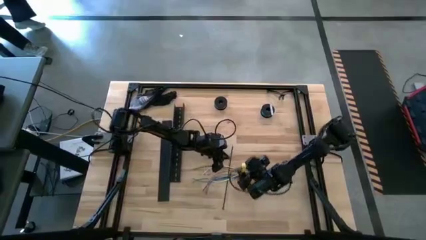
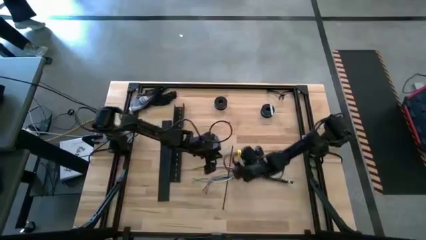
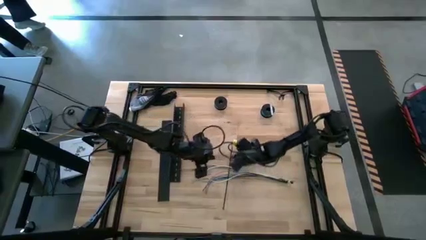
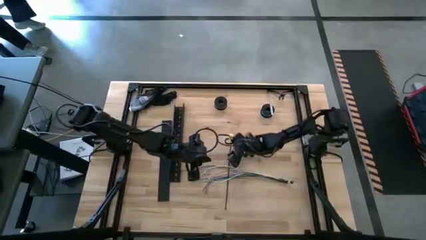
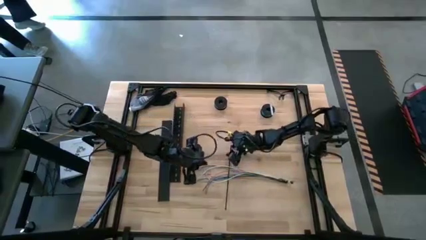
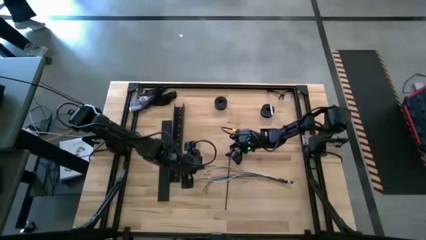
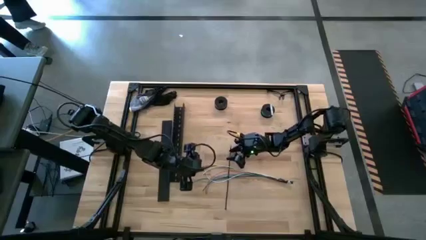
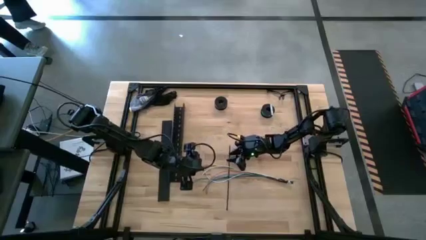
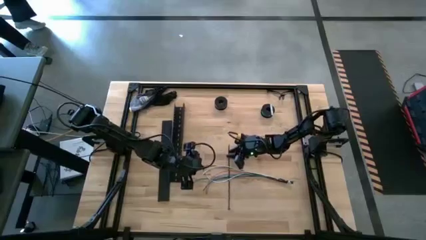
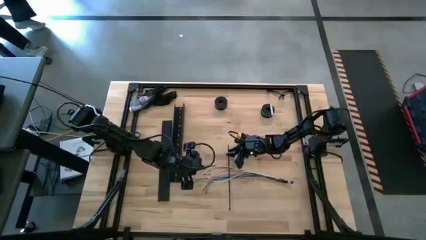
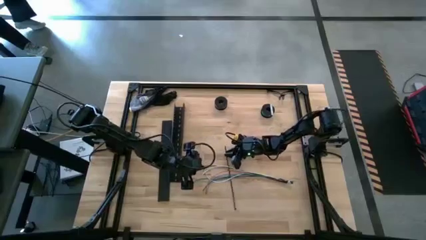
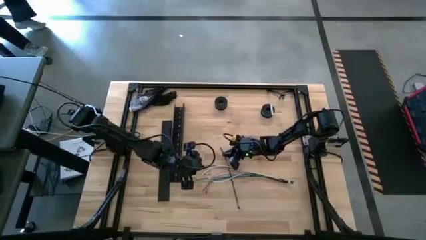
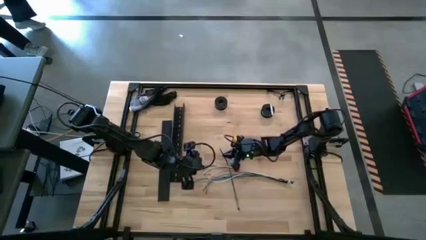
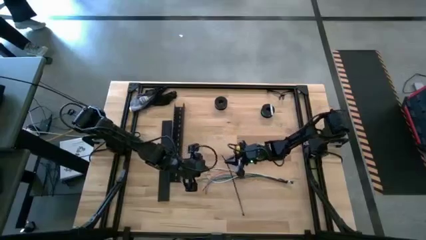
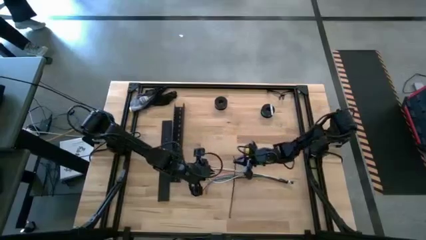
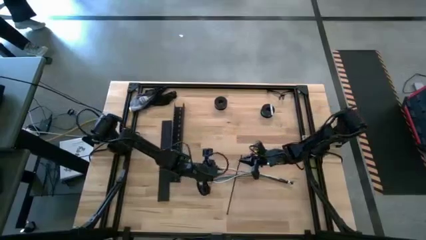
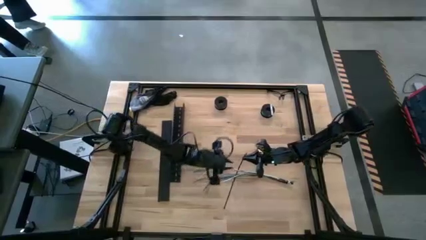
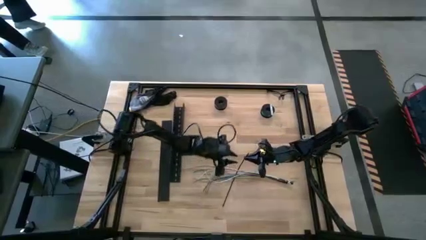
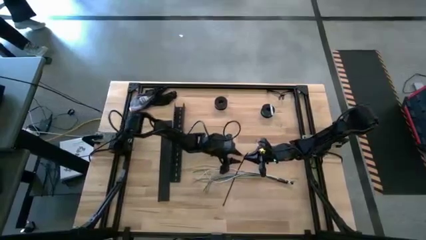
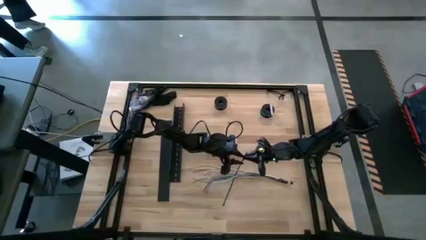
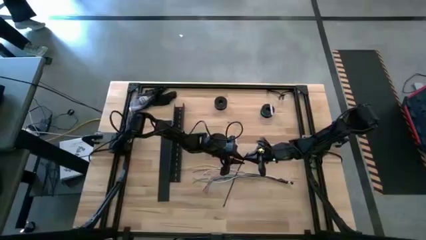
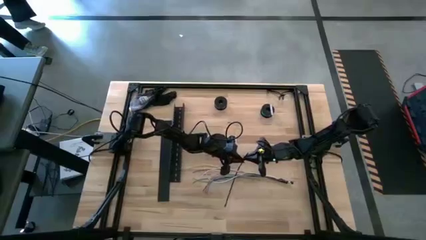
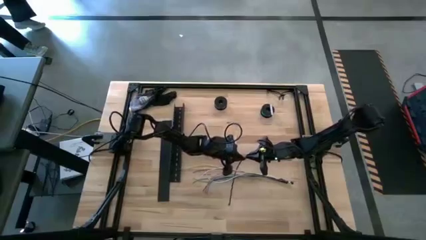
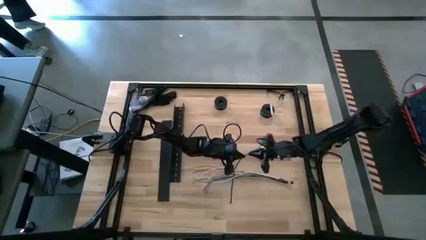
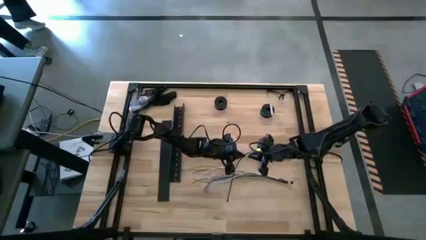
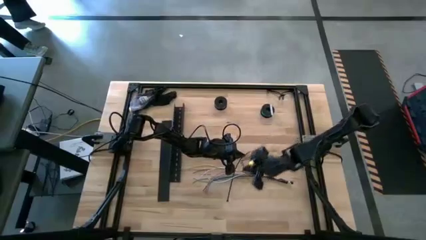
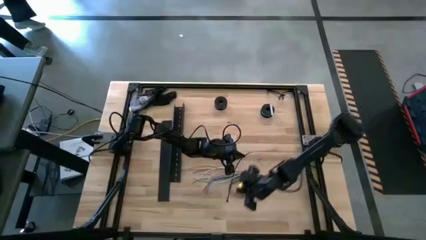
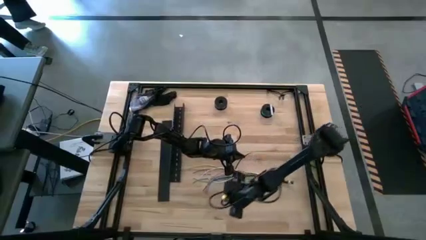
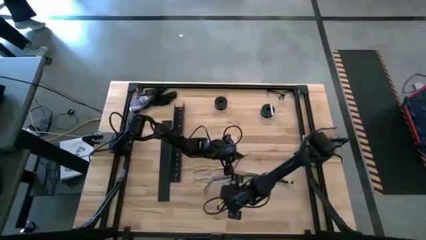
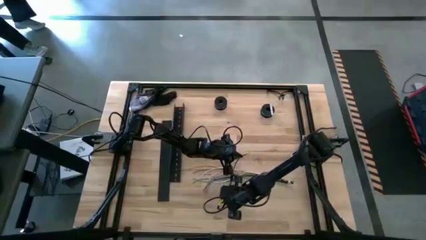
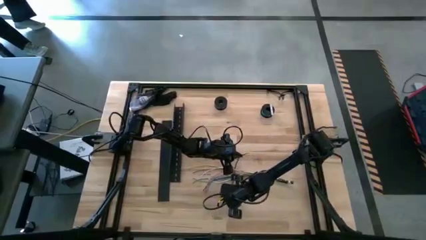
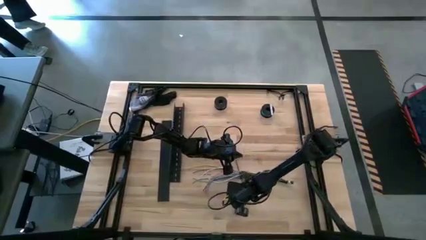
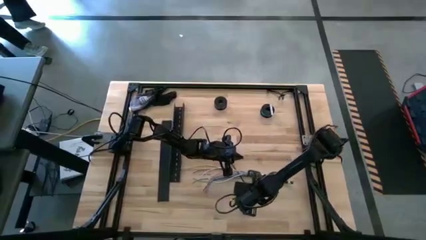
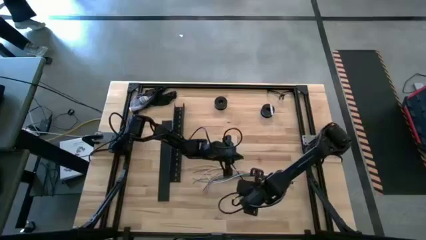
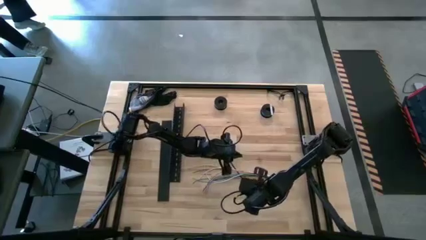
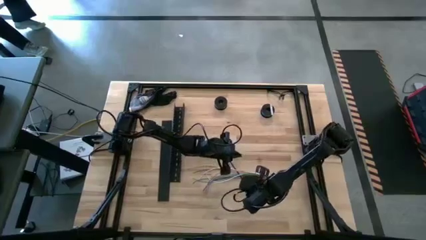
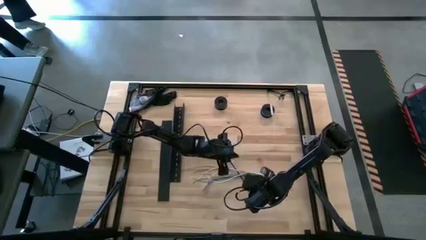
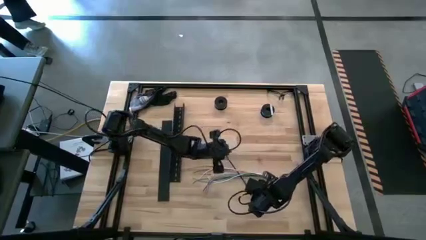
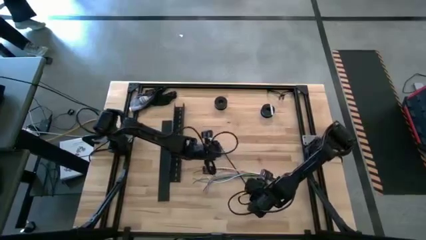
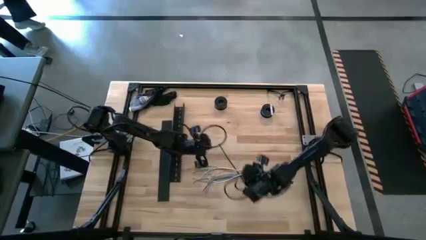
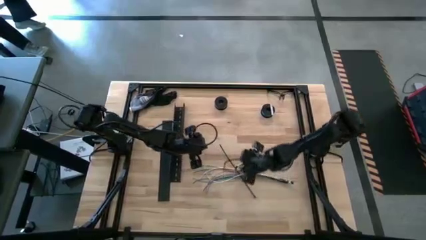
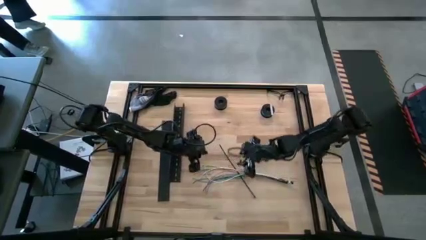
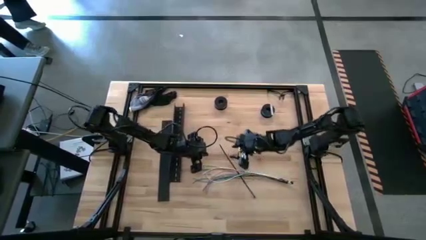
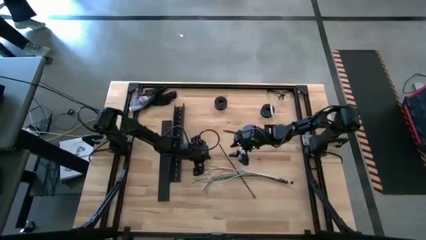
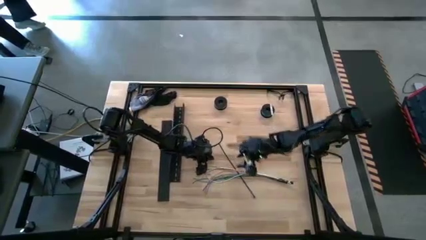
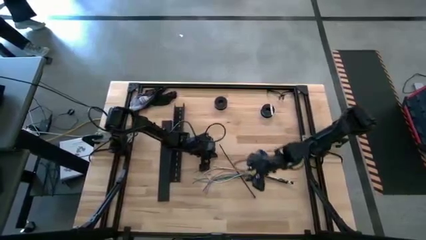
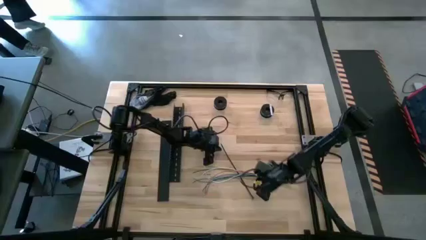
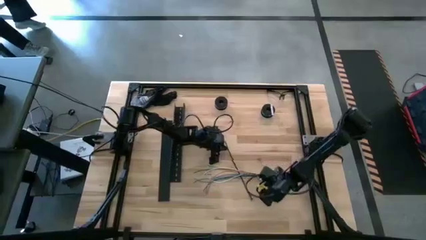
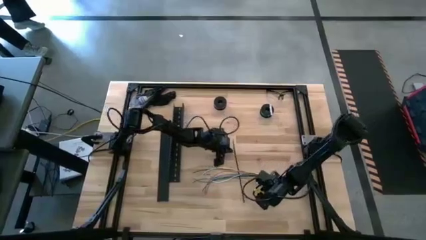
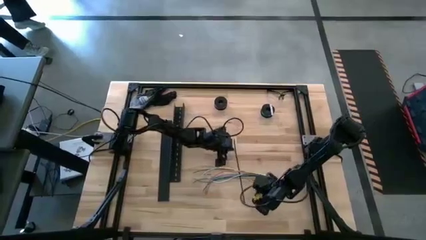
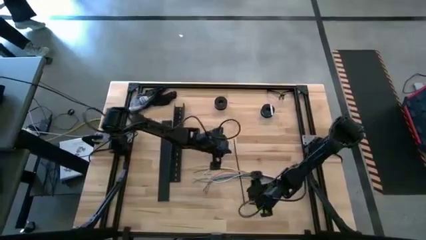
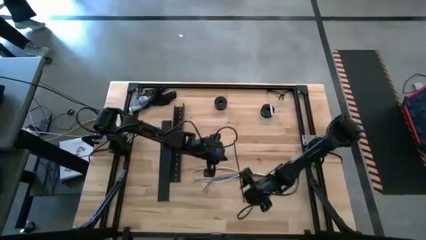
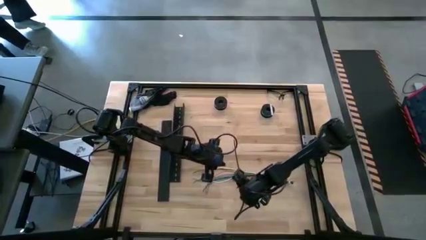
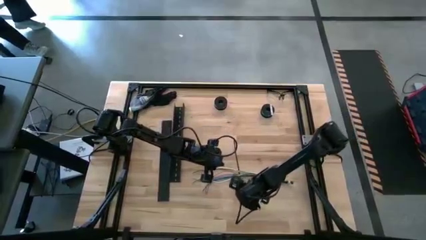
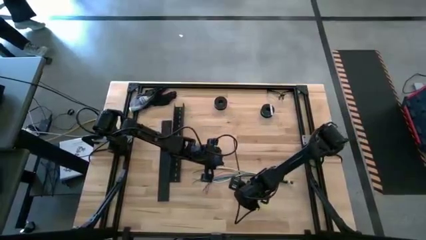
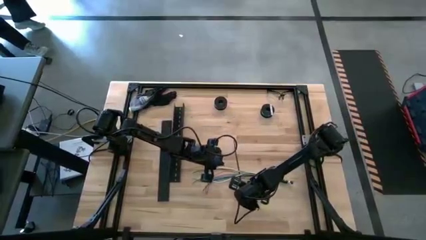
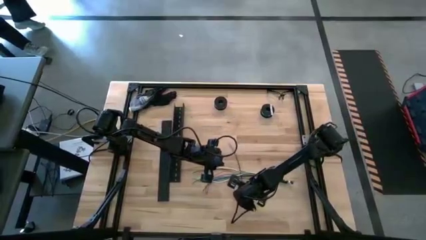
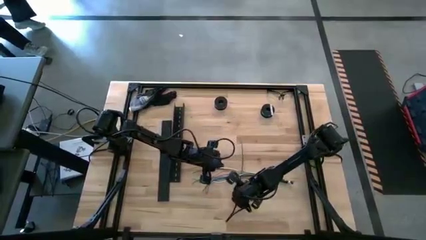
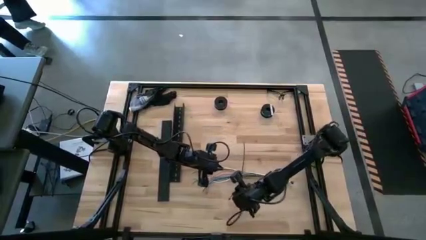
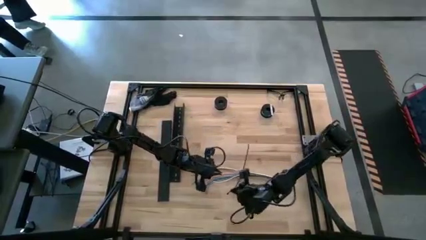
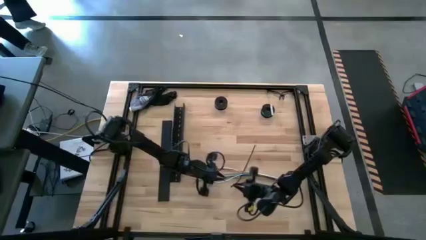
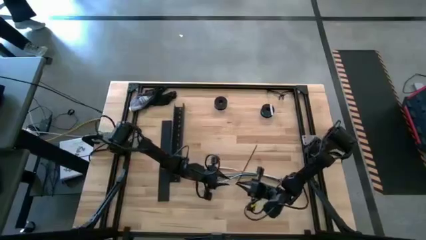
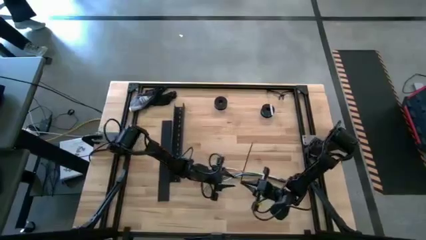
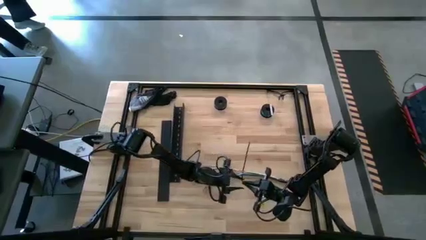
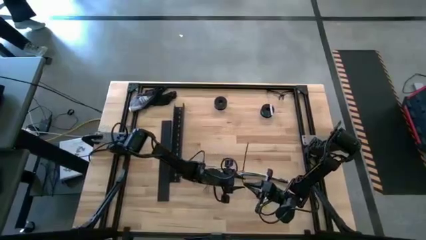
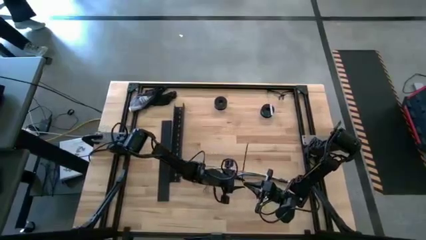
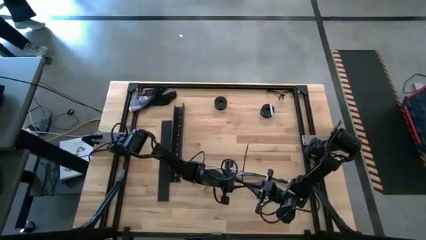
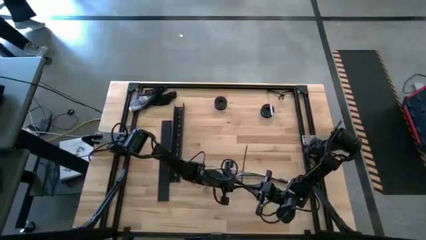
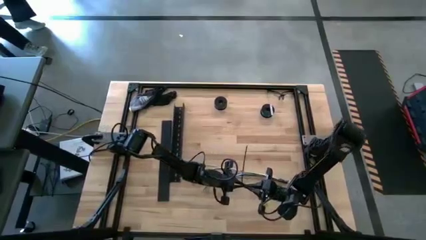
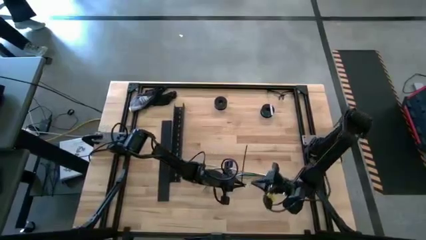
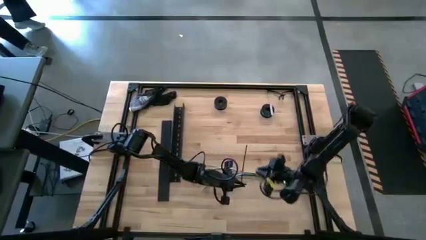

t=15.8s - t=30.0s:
Task: Ziptie cables
Wrap the black zip tie on the cable
